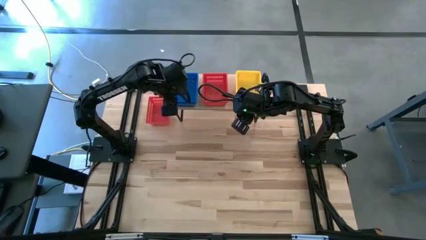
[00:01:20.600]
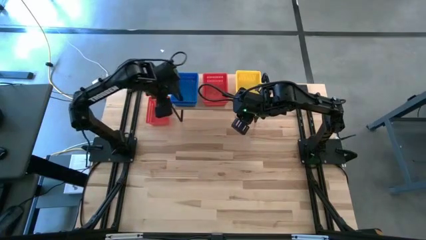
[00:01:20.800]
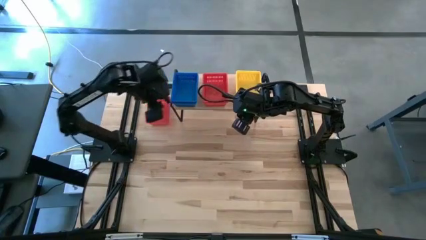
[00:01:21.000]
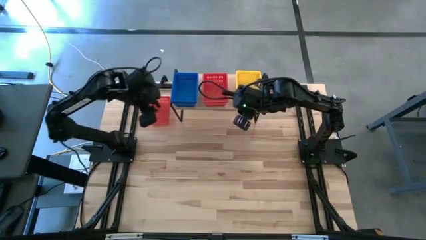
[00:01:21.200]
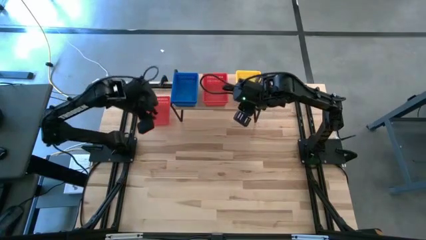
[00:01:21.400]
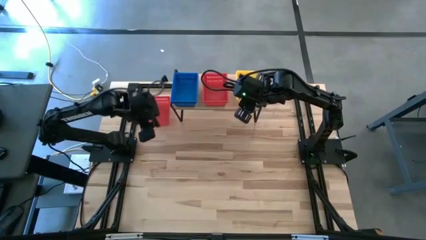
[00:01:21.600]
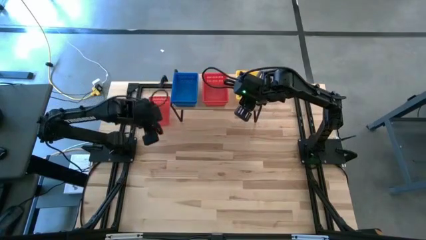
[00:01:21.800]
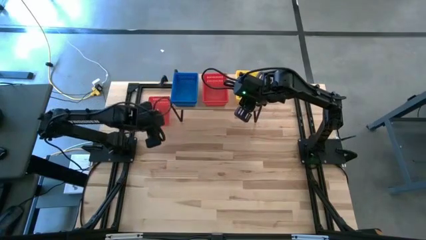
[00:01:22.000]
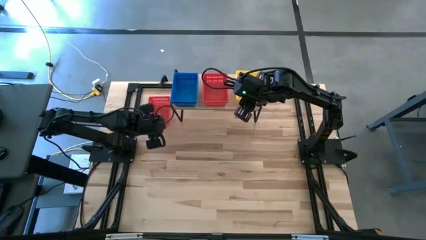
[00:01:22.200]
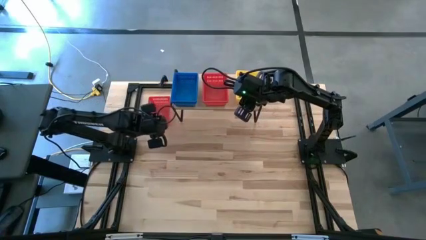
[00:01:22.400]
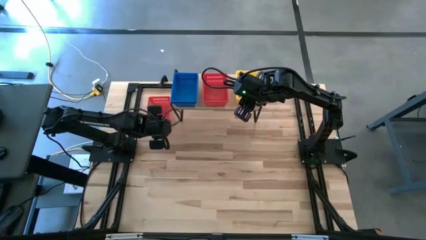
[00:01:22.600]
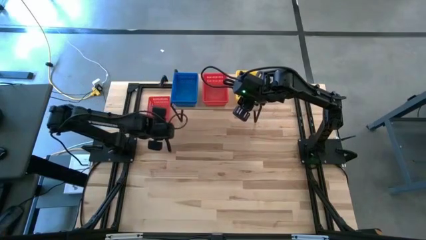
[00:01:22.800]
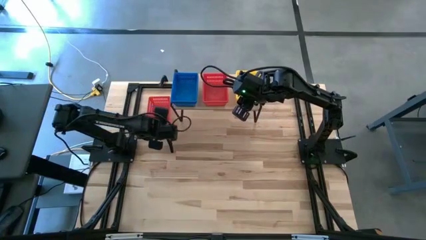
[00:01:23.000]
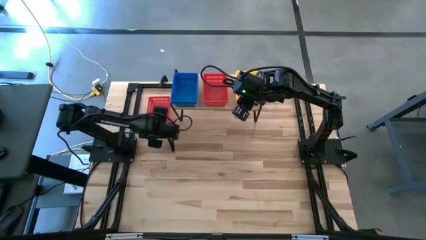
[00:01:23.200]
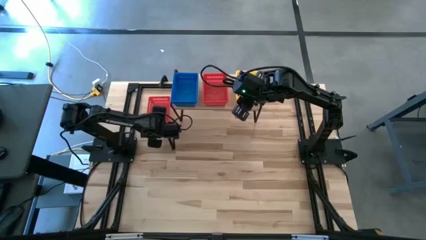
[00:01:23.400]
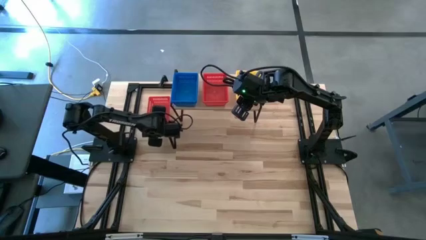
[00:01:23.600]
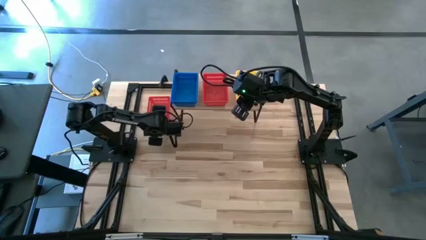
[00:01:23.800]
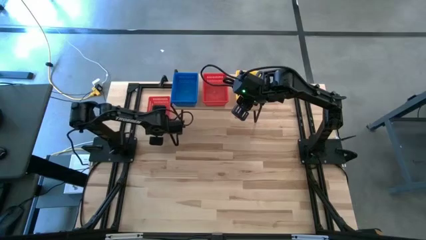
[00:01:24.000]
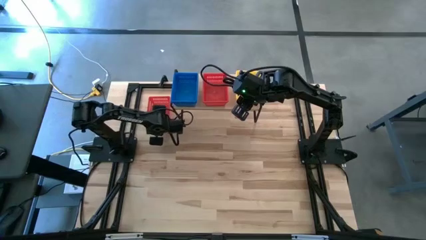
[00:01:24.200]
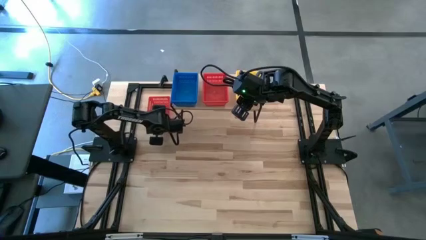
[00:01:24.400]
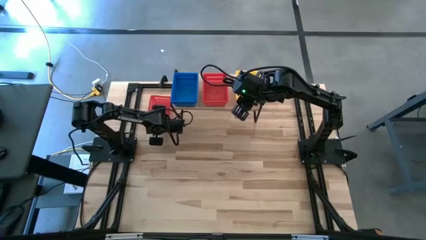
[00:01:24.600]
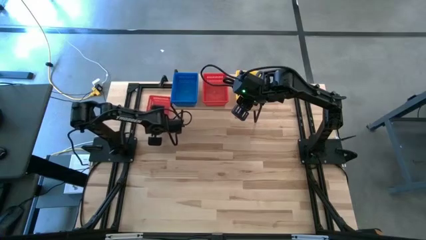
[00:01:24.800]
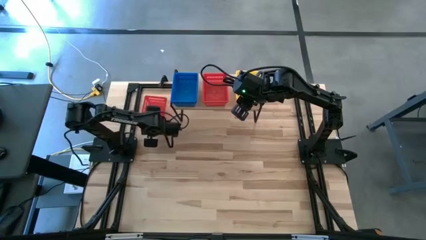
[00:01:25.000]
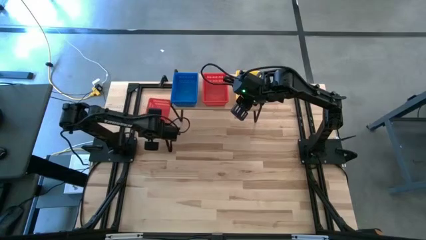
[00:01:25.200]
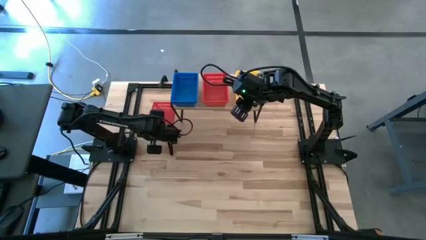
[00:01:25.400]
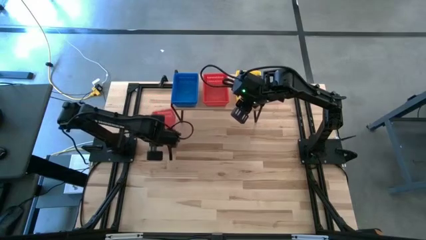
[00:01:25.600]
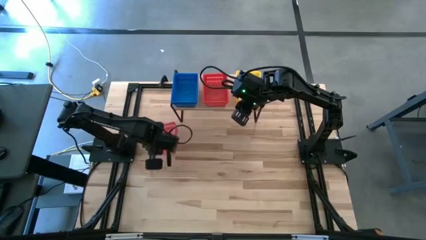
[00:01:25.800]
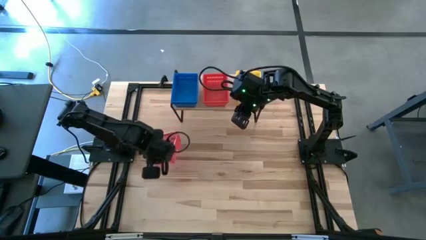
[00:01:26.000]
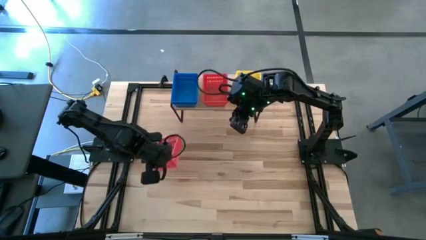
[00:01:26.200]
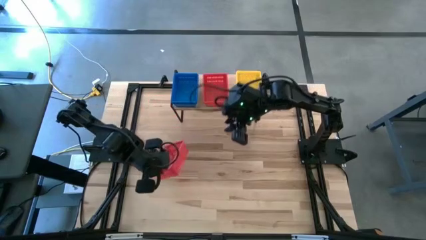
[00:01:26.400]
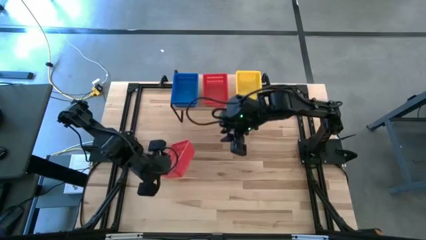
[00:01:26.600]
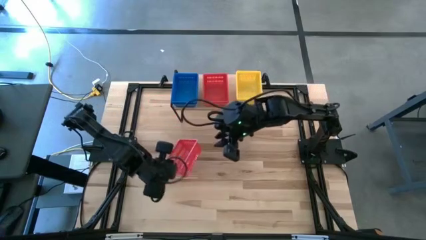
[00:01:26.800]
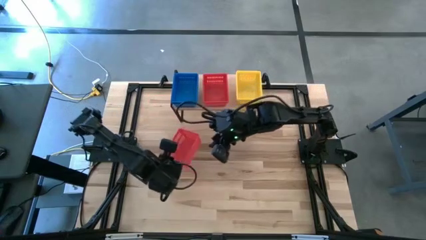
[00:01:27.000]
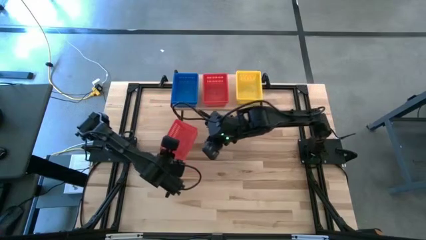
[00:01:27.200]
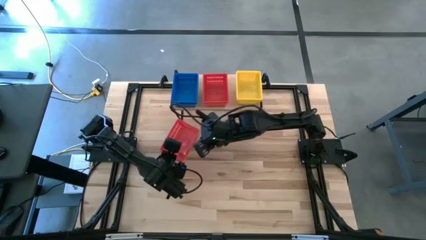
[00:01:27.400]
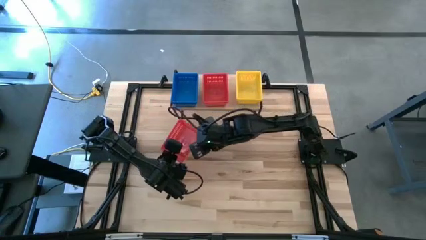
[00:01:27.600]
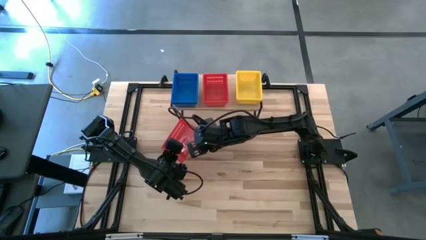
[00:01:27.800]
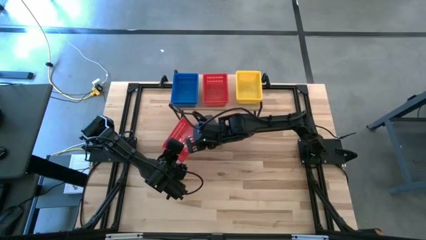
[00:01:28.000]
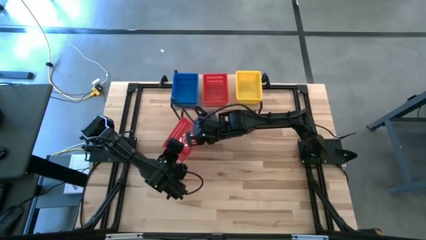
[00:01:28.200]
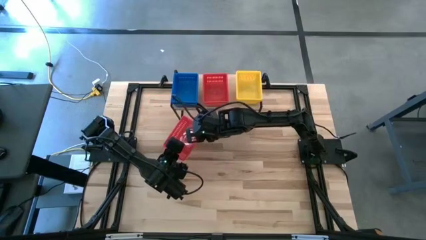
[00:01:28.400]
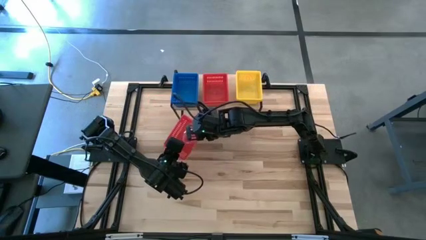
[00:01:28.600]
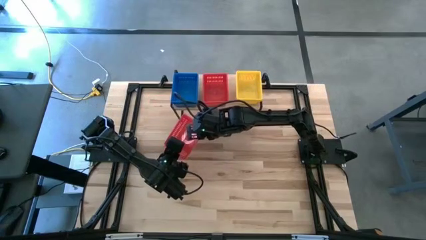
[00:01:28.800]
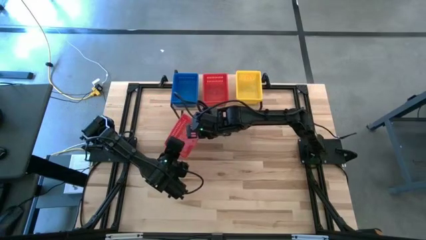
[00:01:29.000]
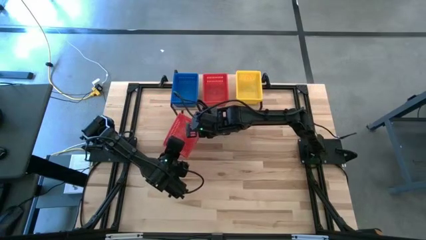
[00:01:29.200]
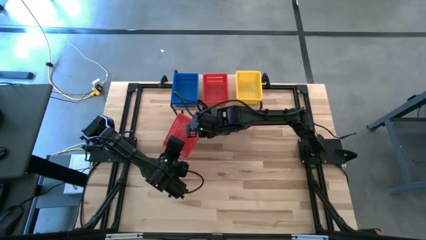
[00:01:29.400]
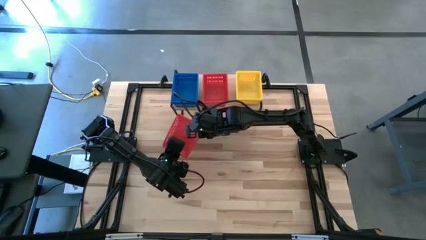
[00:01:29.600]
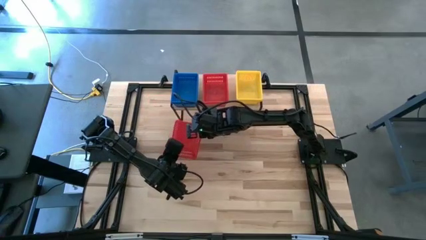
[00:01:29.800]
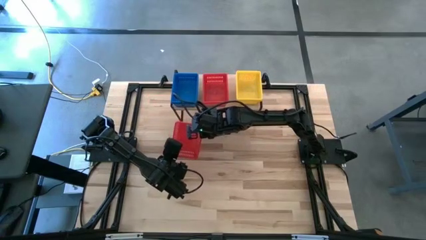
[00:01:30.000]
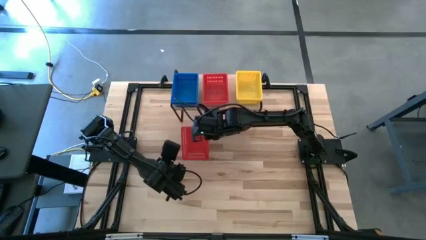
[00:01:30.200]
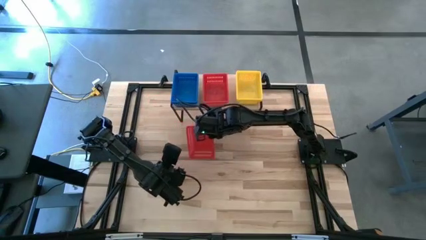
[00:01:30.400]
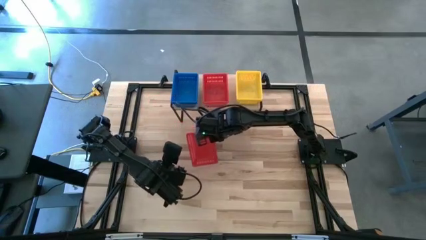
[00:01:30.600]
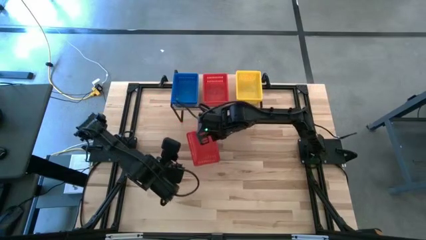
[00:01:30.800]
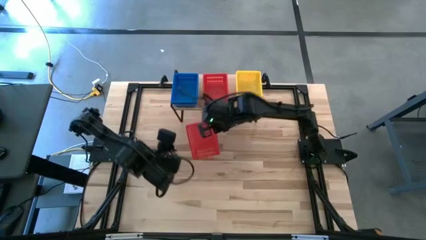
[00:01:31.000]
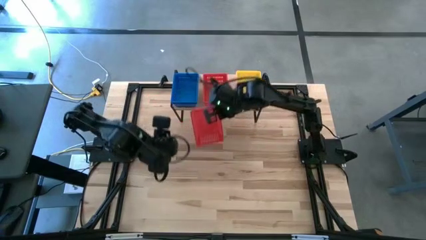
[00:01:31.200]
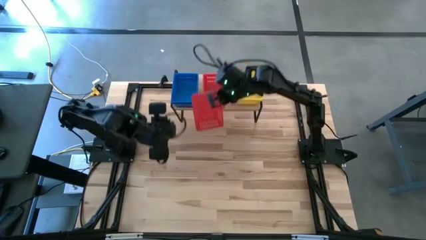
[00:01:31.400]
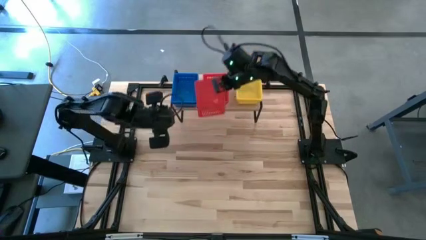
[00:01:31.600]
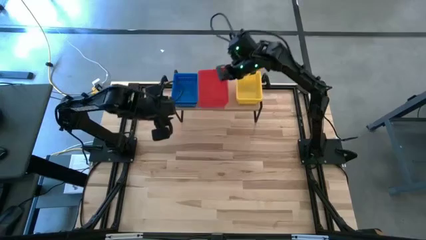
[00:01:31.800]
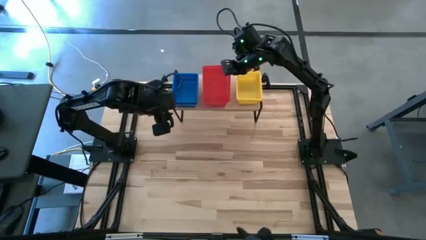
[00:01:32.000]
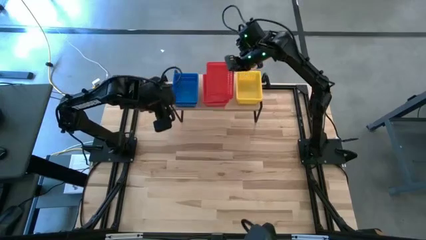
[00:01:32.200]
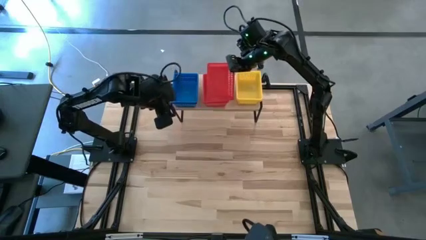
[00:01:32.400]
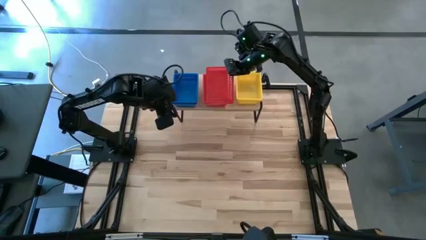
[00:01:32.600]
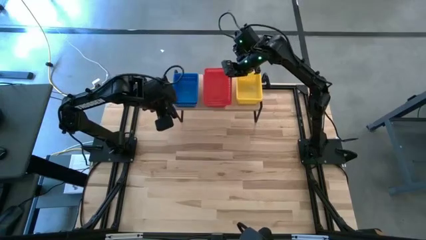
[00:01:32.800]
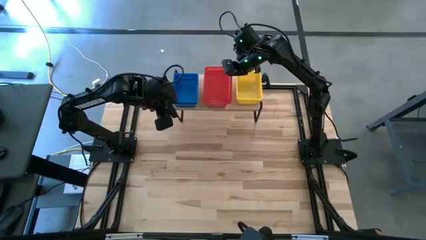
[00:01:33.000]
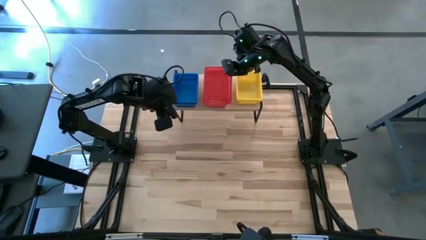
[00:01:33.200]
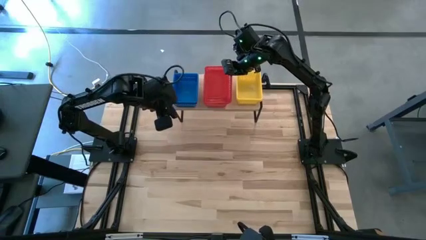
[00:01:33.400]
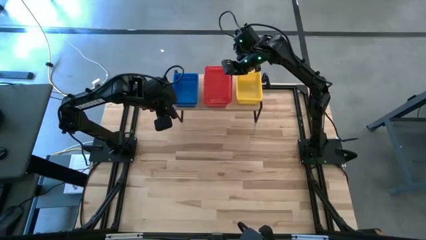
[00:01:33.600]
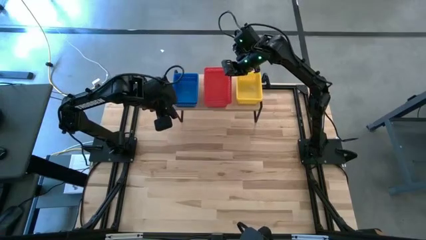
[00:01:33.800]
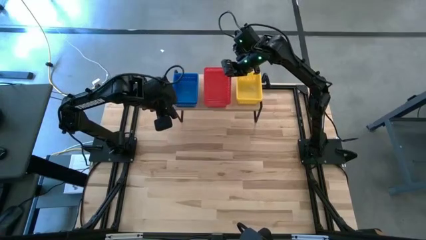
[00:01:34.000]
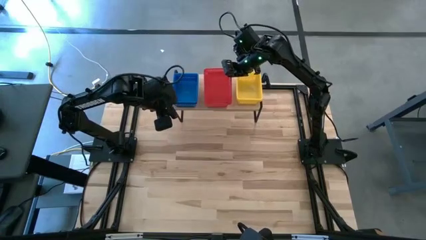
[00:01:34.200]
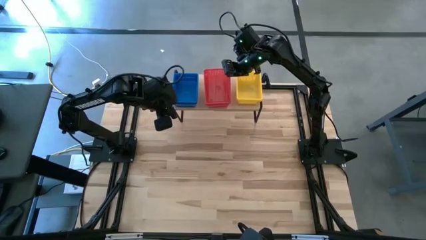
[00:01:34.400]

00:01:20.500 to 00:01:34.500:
Task: Stack baskets on shelf by color
Stack the red basket into the other red baskets on the shelf
